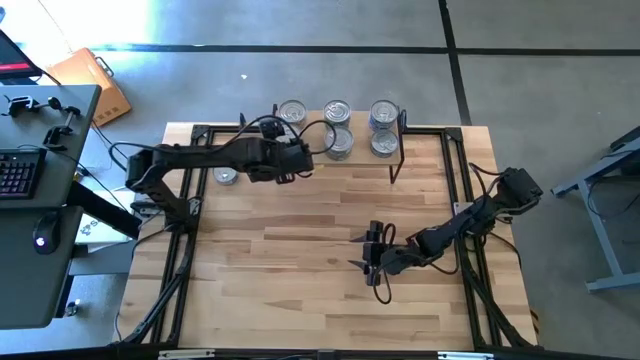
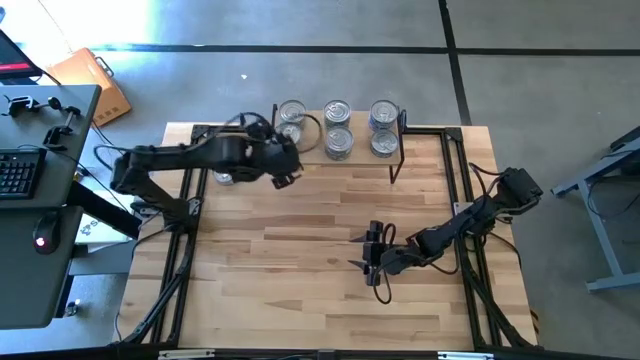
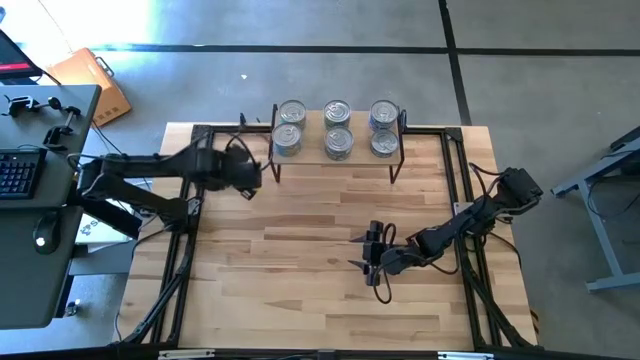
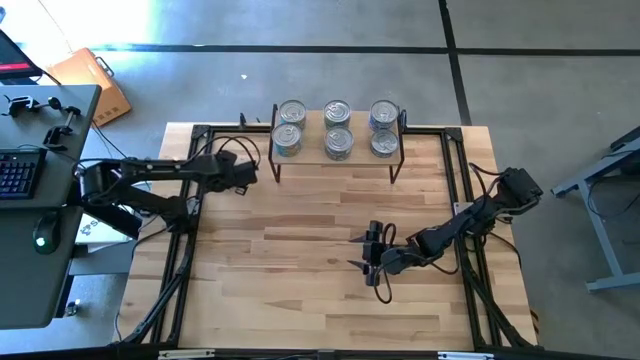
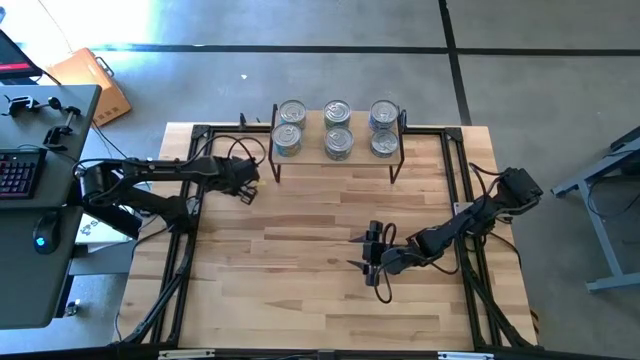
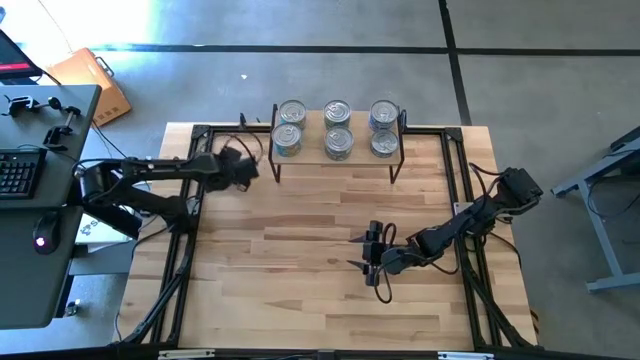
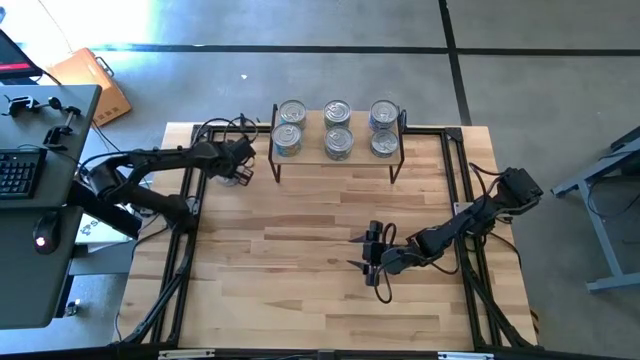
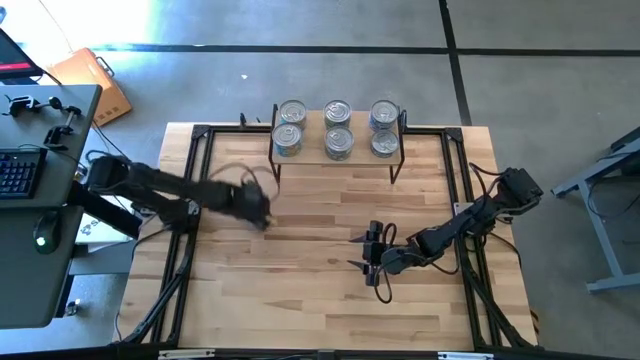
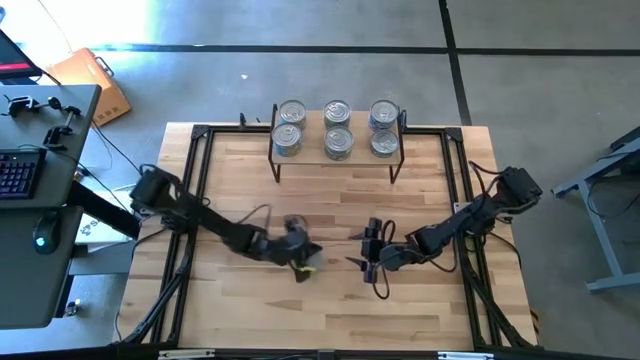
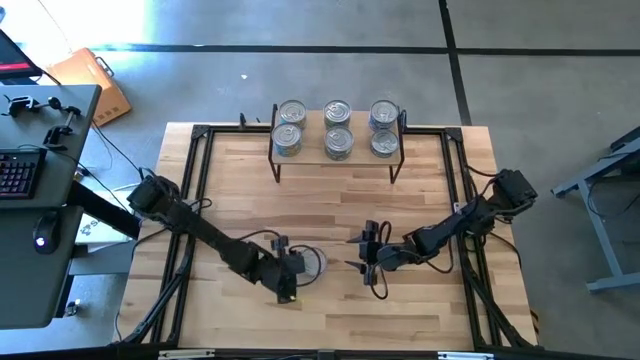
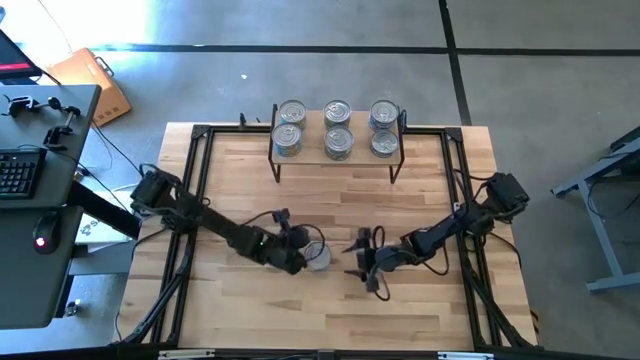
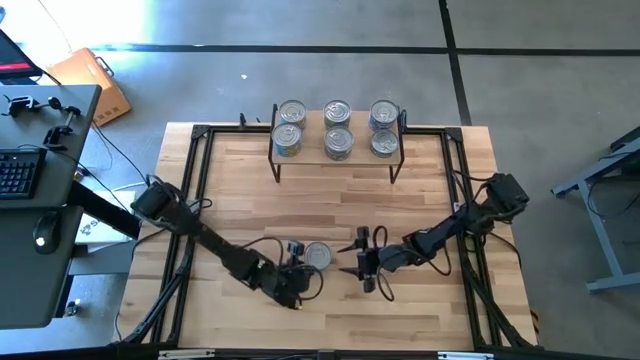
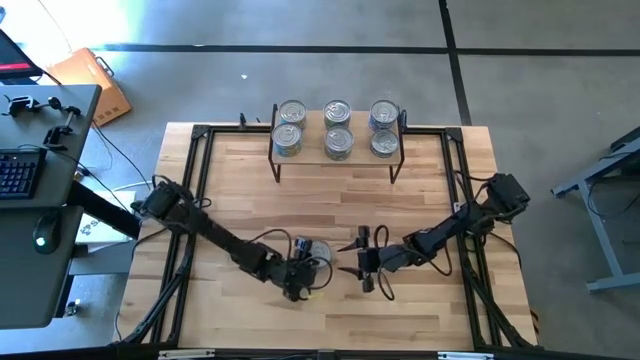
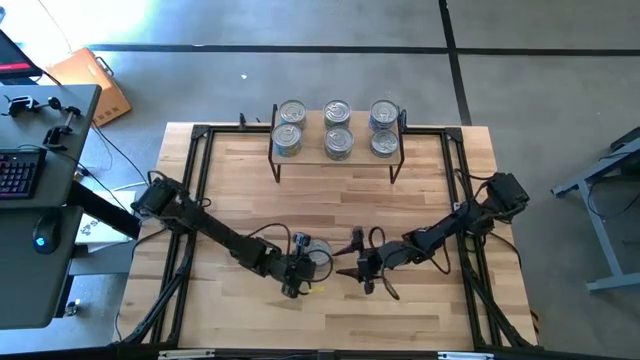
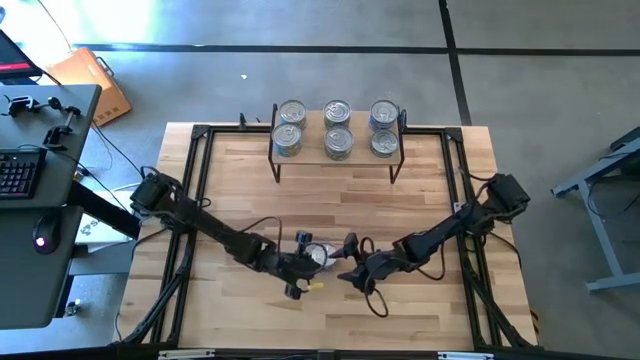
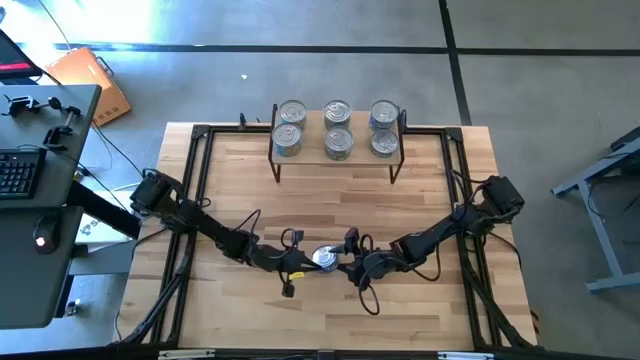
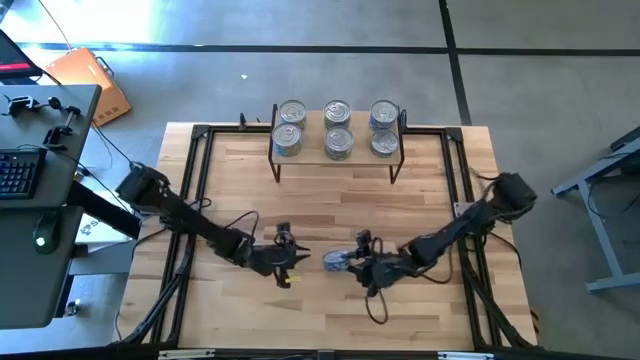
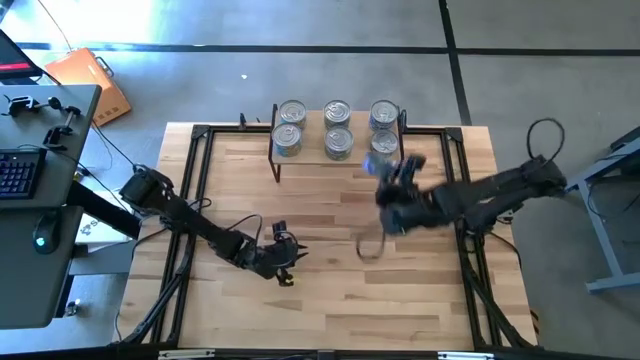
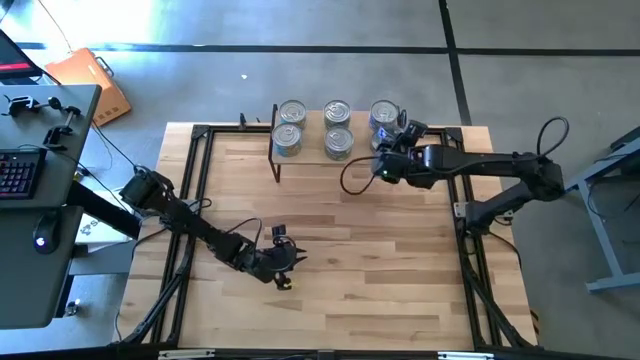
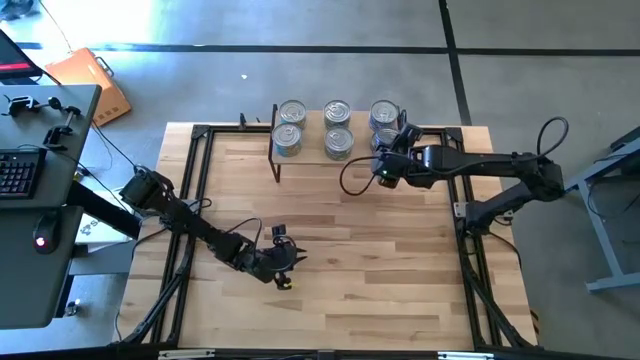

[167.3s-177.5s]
Task: Stack canned seafood by type on shelf
Stack the blue tuna can on top of the other blue tuna can on the shelf

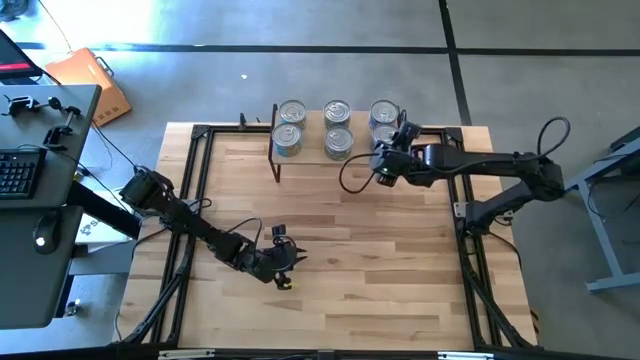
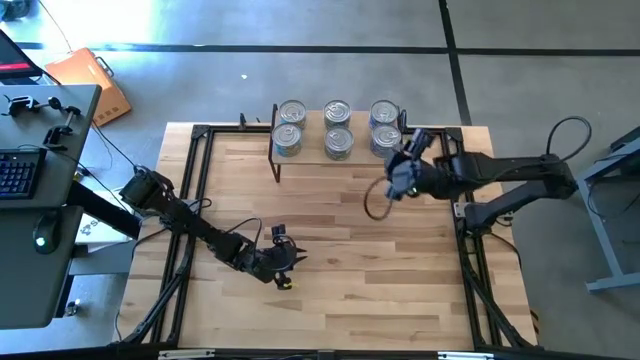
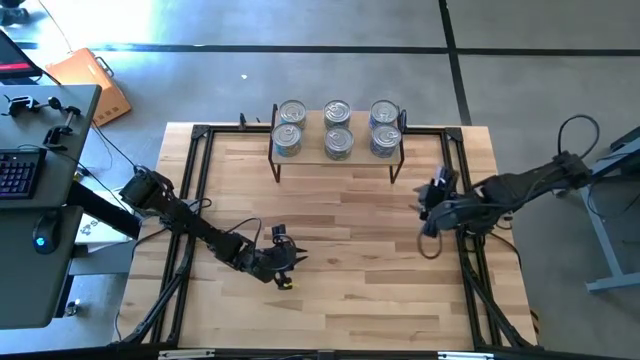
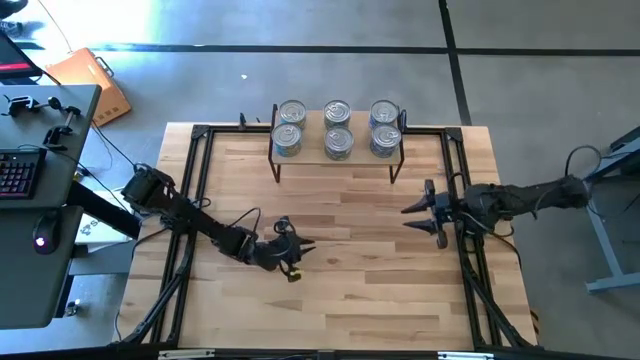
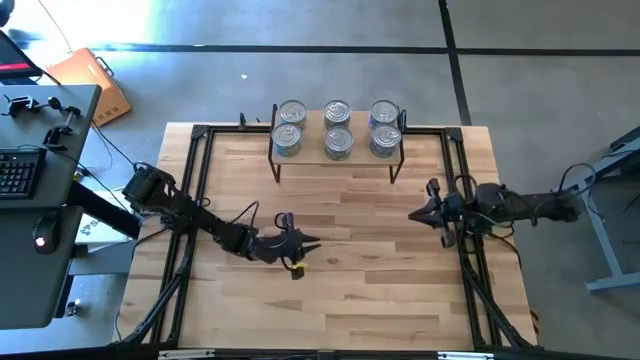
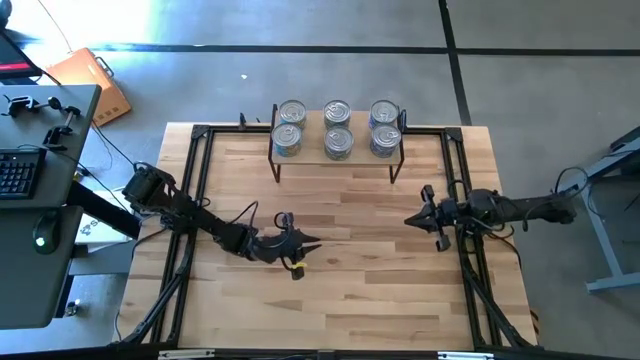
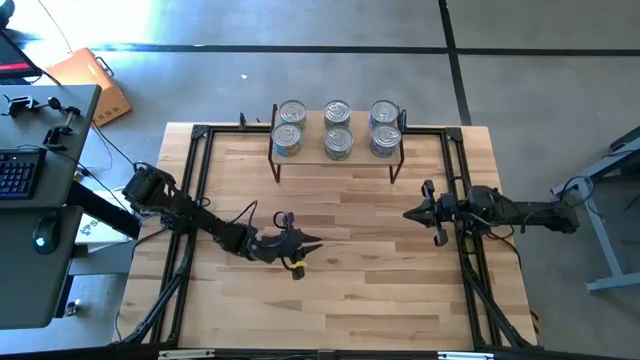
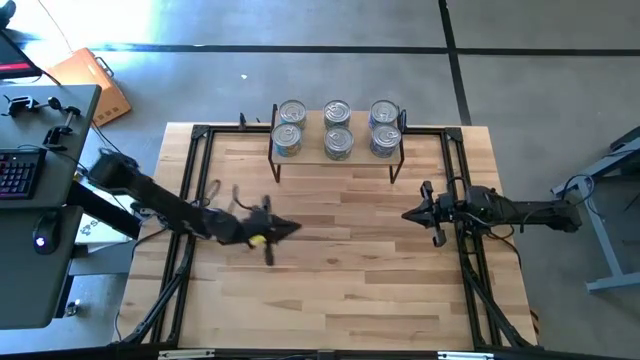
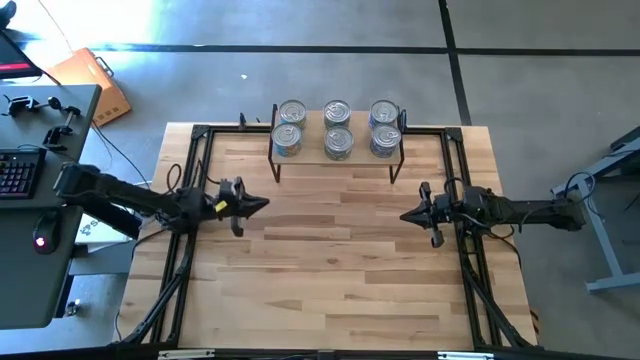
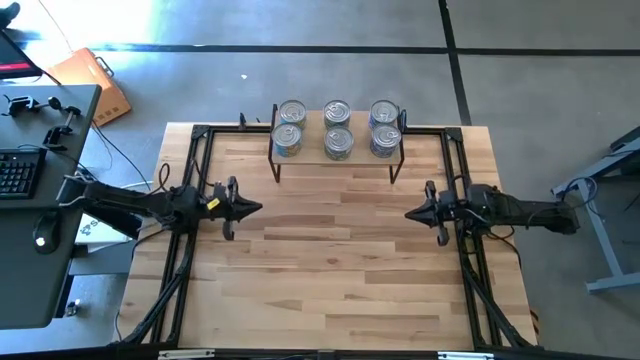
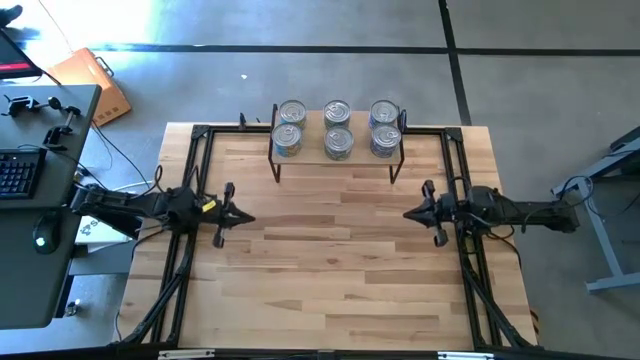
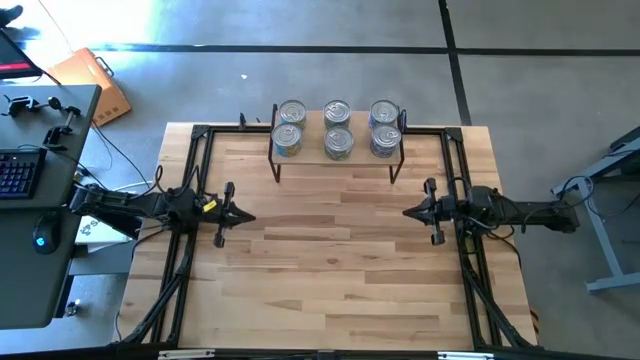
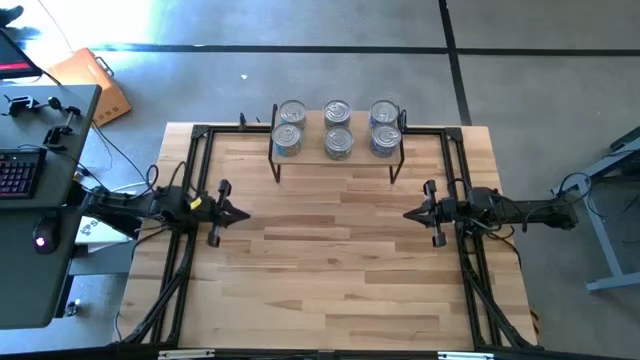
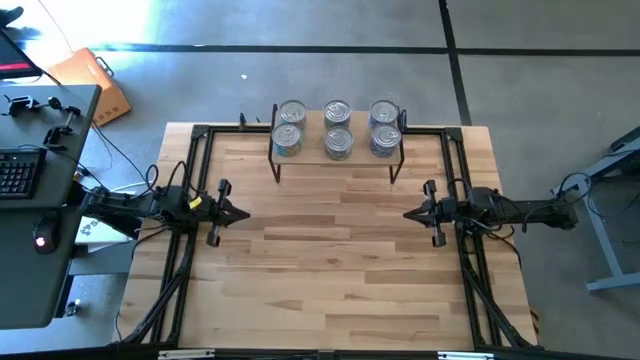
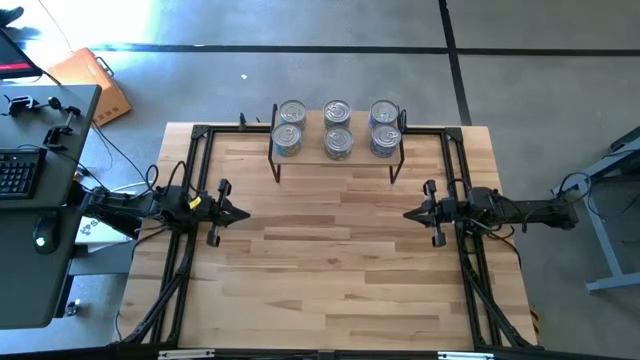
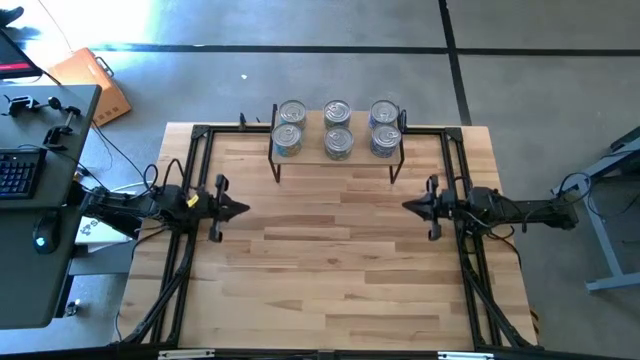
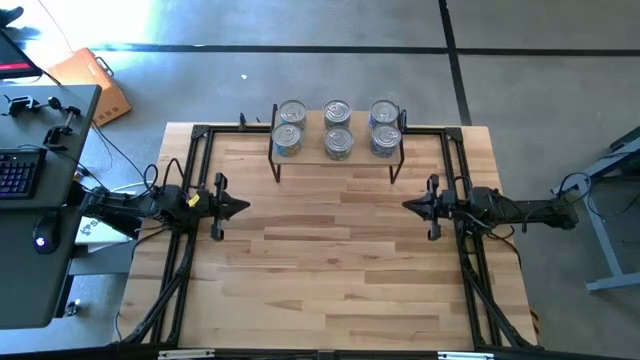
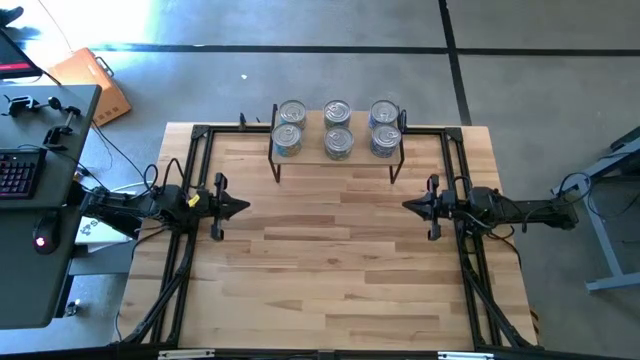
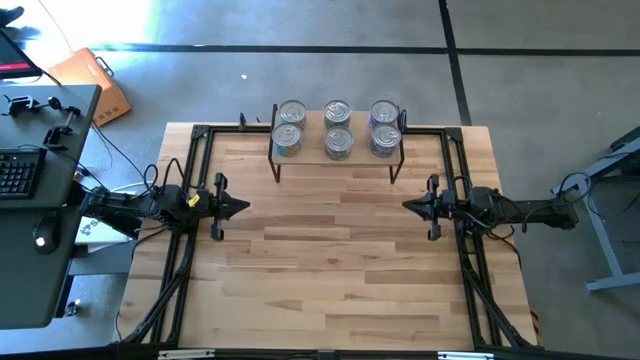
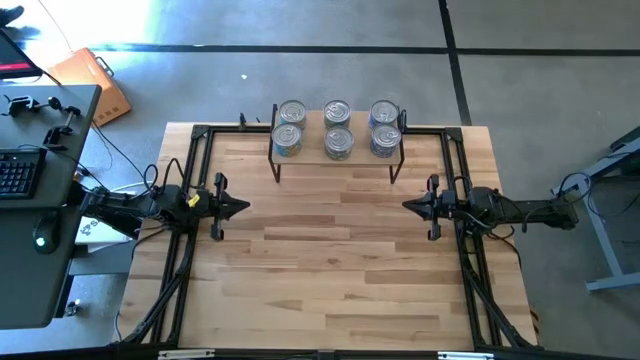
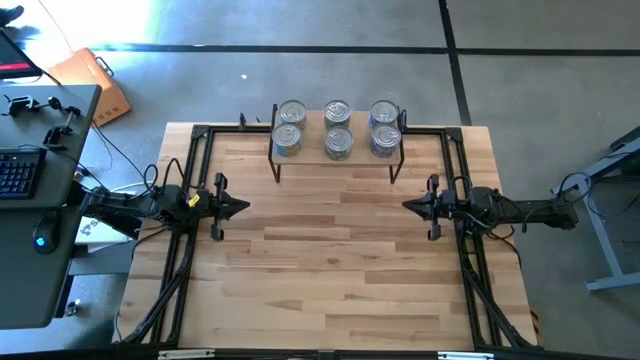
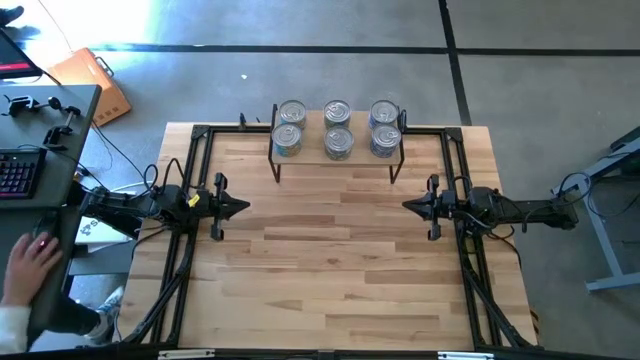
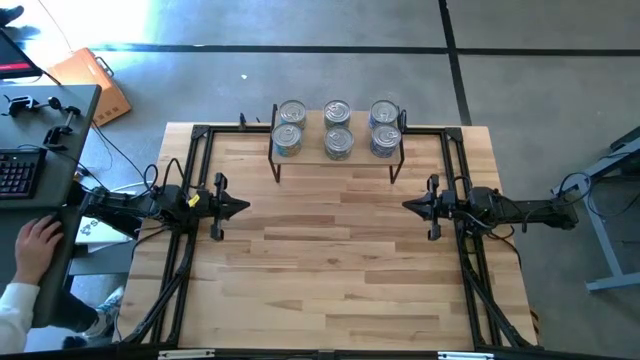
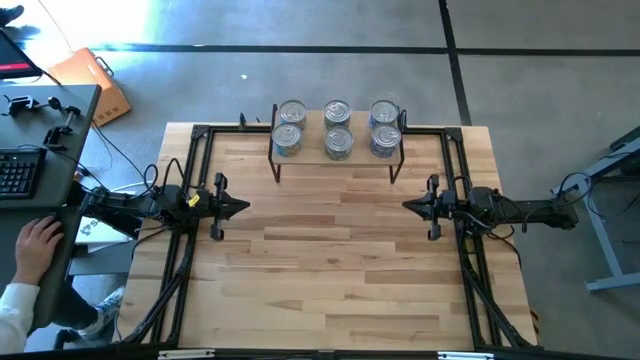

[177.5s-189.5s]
Return to Home Position
